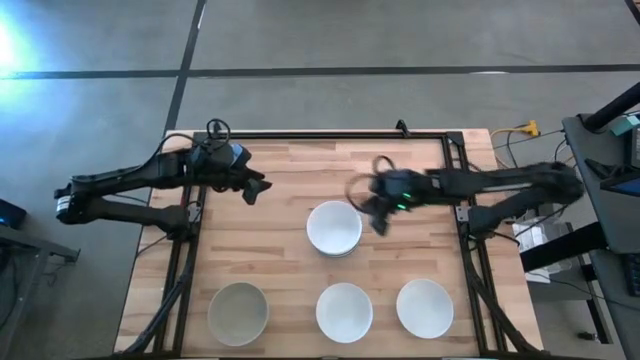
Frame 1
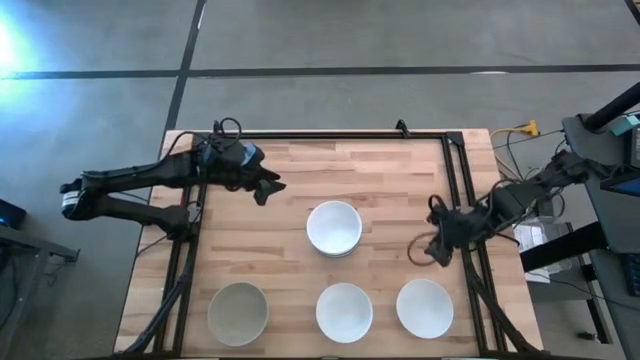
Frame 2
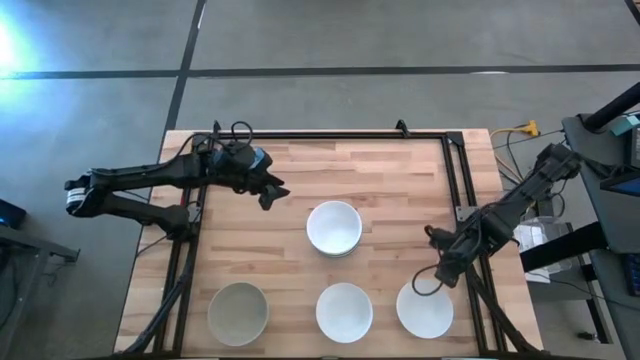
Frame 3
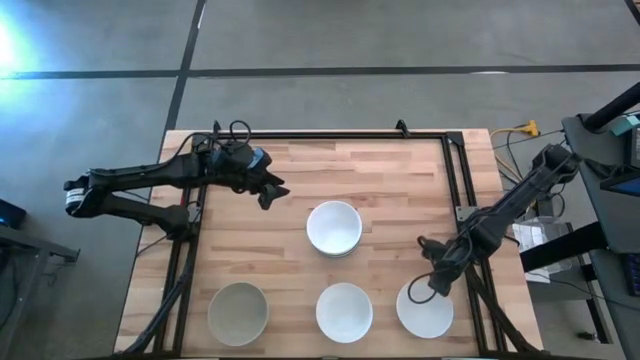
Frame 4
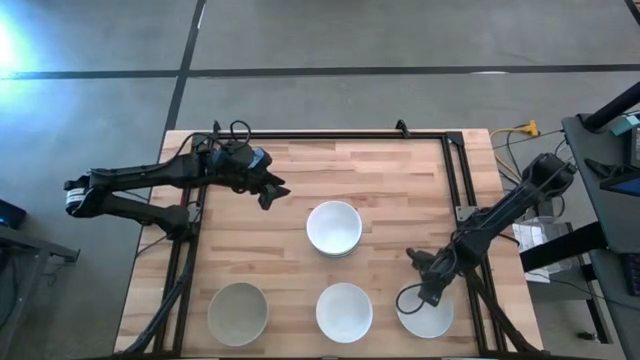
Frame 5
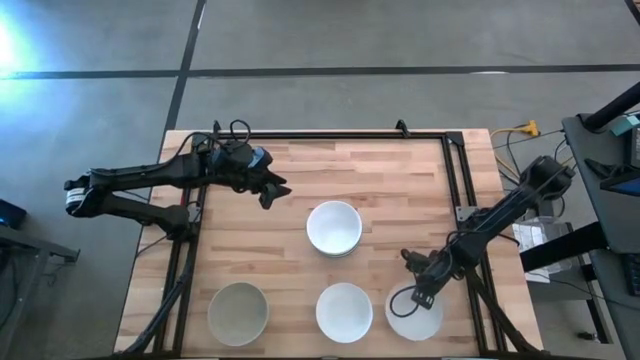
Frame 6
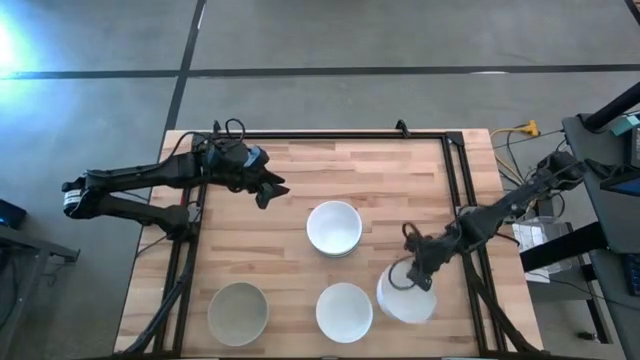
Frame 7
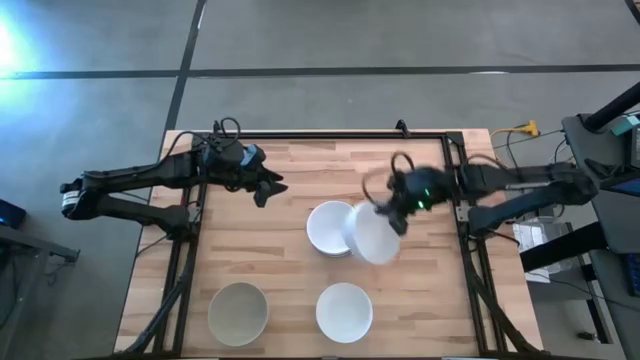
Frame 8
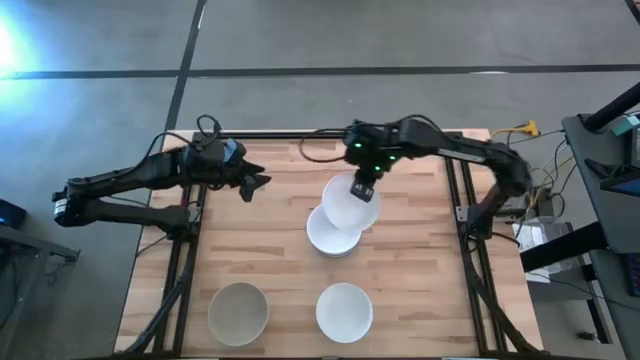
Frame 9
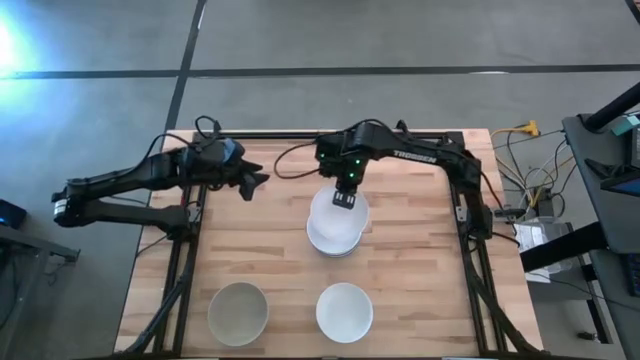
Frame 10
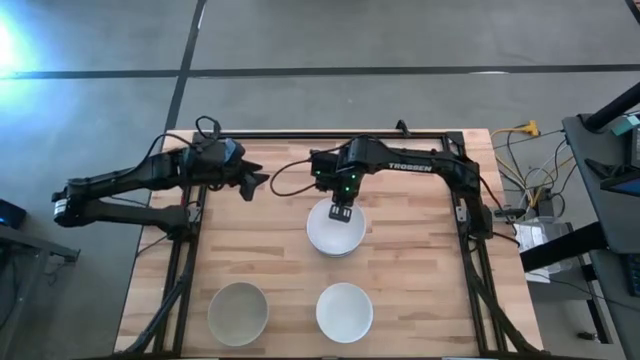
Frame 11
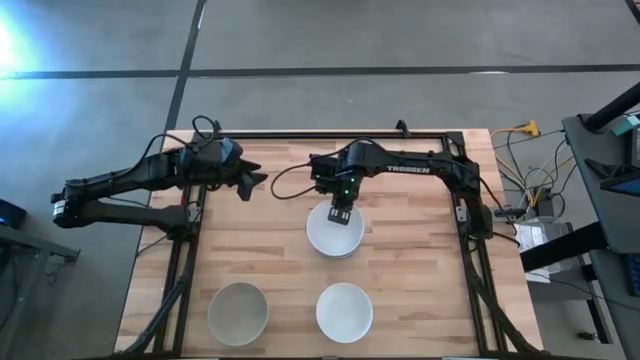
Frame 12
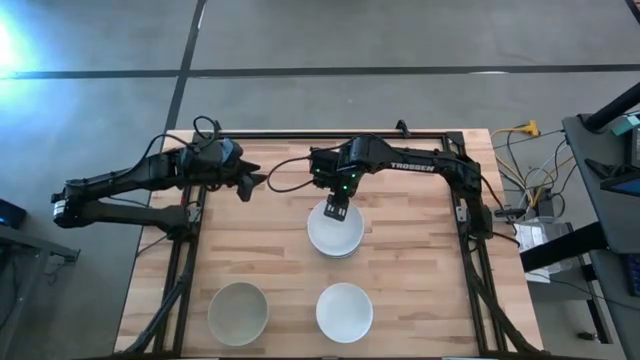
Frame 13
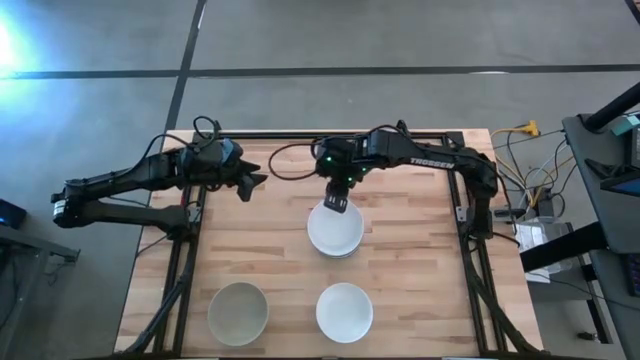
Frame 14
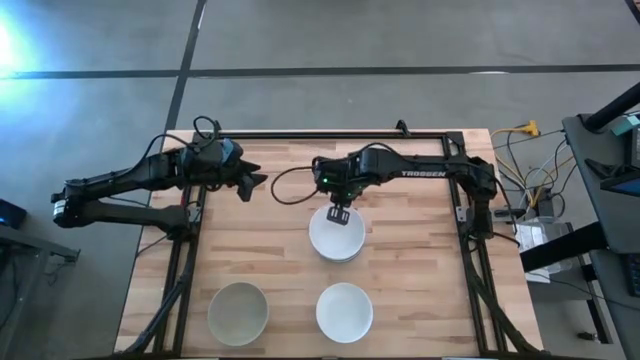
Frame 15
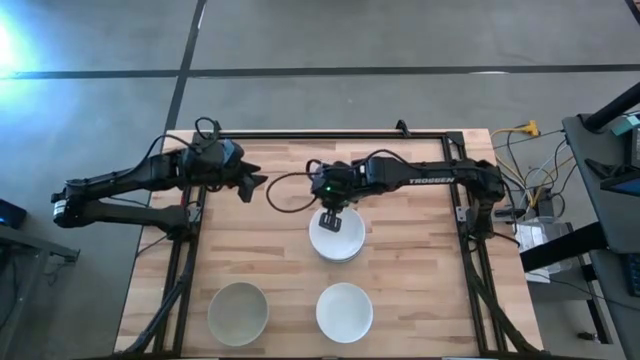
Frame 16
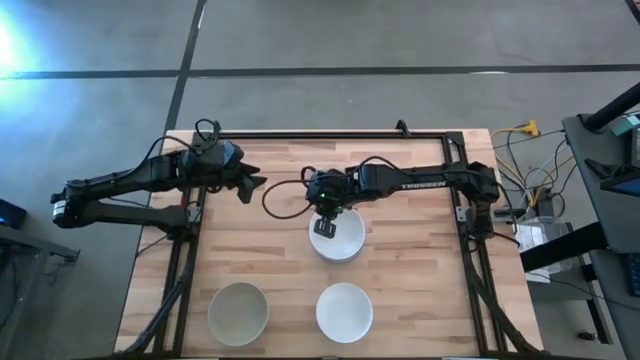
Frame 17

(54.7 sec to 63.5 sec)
Task: Nest bowls inside each other
Stack the white bowl on top of the white bowl

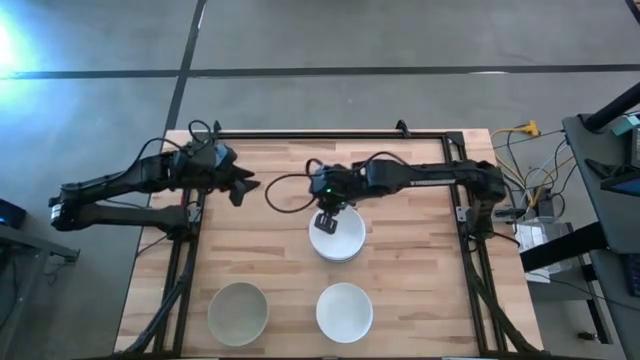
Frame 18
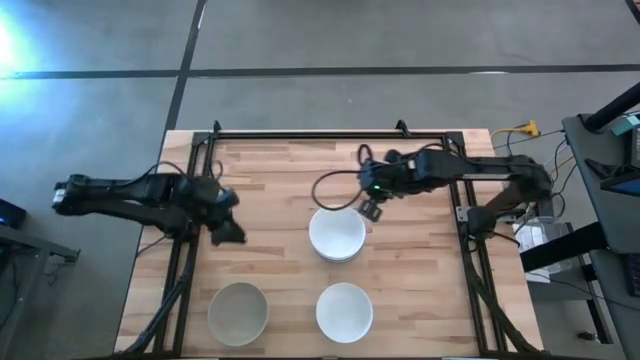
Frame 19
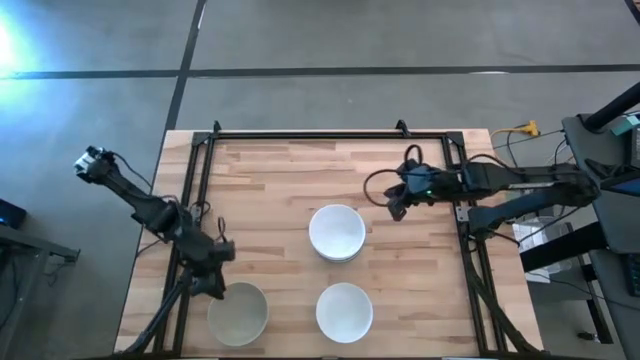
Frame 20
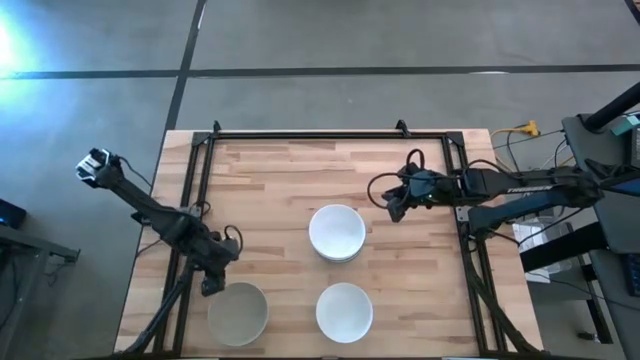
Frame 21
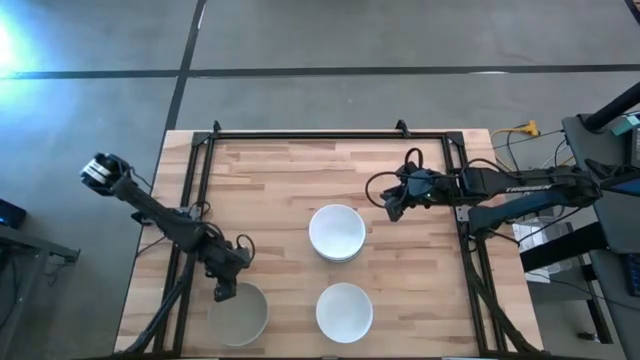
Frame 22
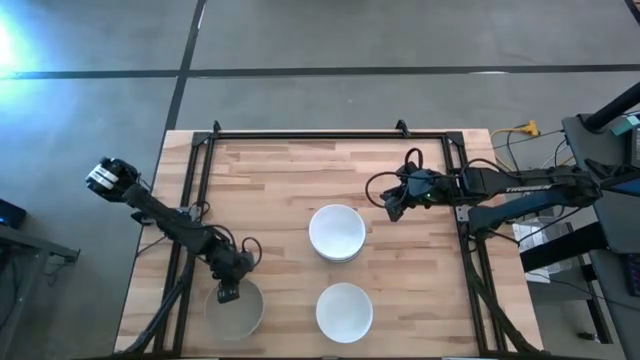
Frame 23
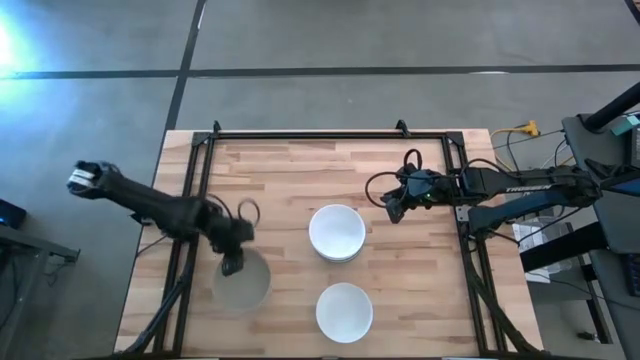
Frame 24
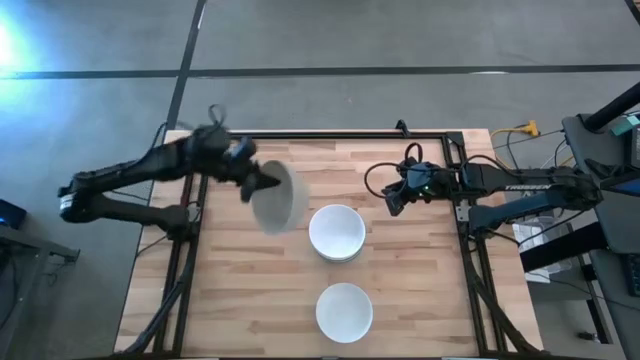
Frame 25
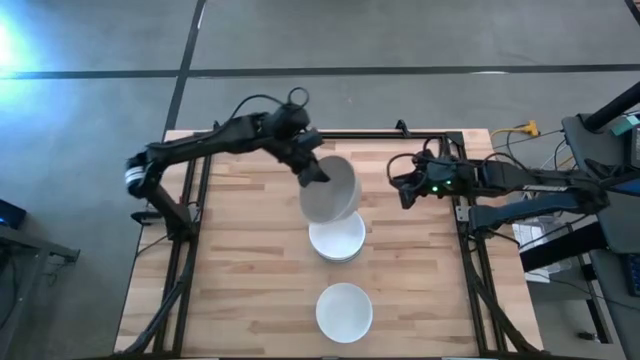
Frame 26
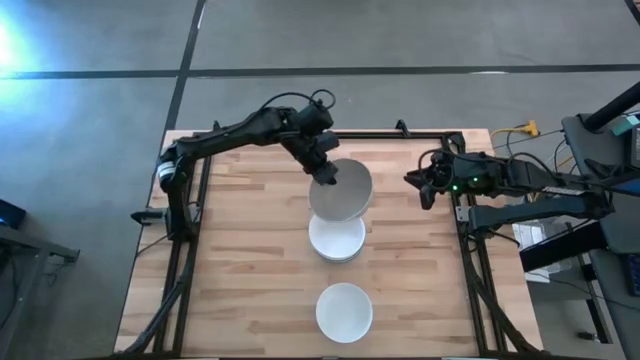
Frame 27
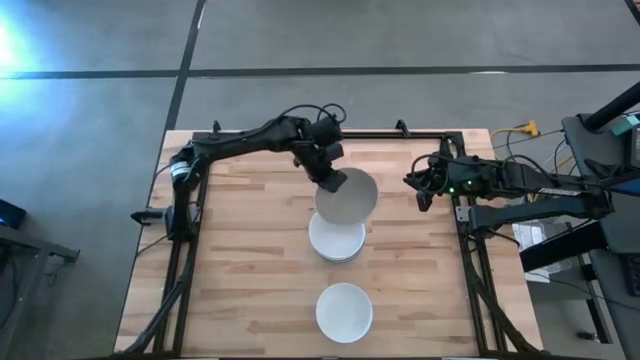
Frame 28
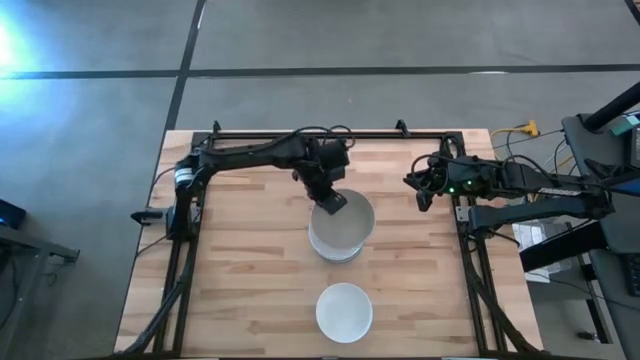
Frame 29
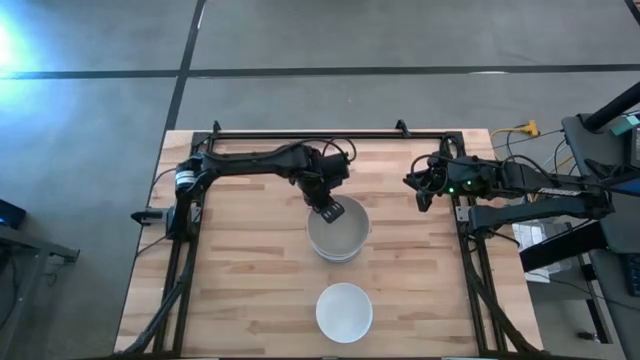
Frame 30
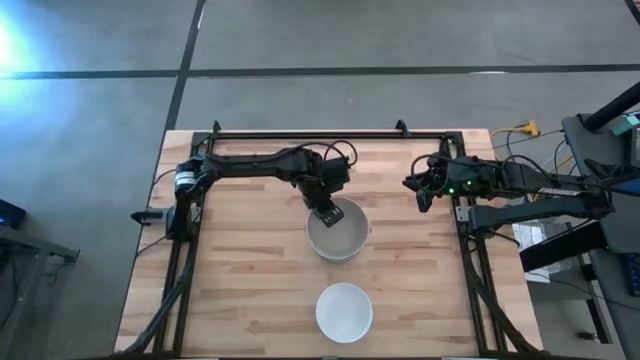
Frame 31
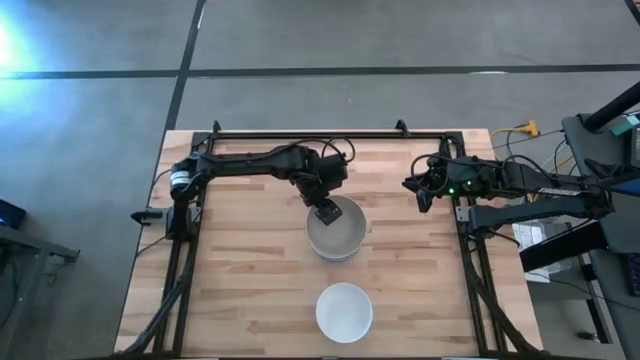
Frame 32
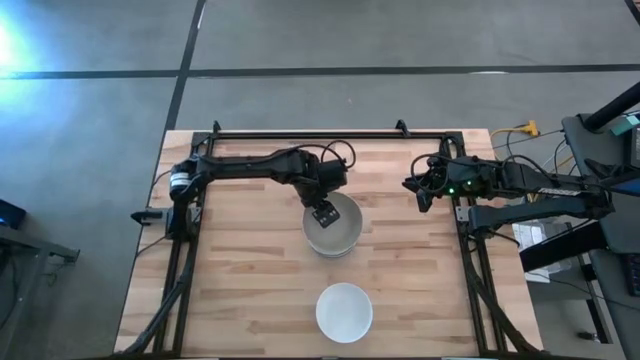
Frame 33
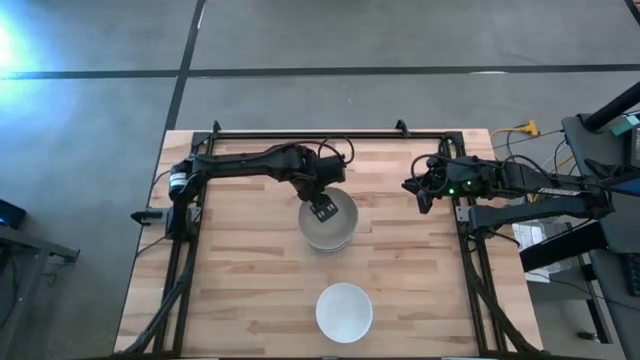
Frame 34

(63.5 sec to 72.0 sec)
Stack the light grey bowl on top of the white bowl

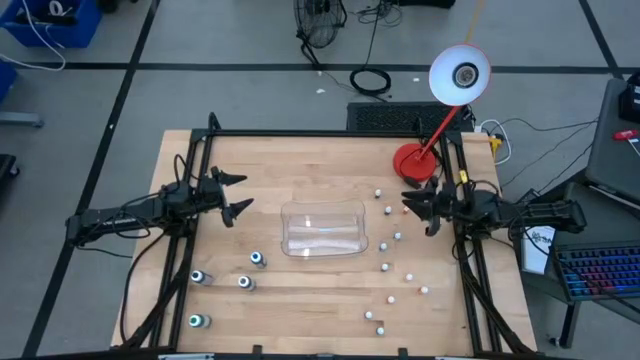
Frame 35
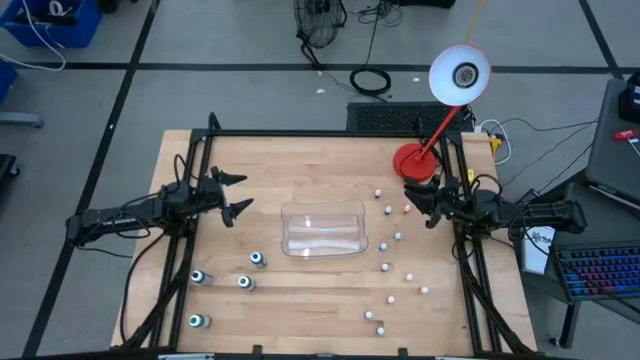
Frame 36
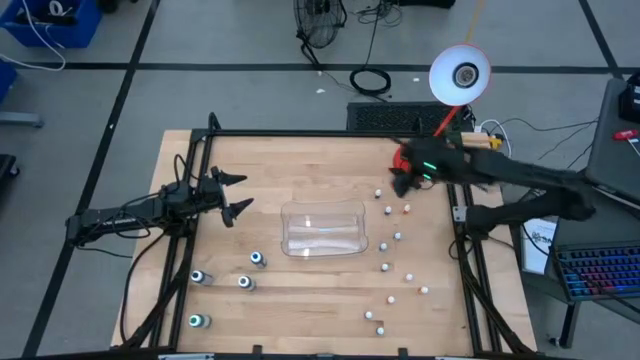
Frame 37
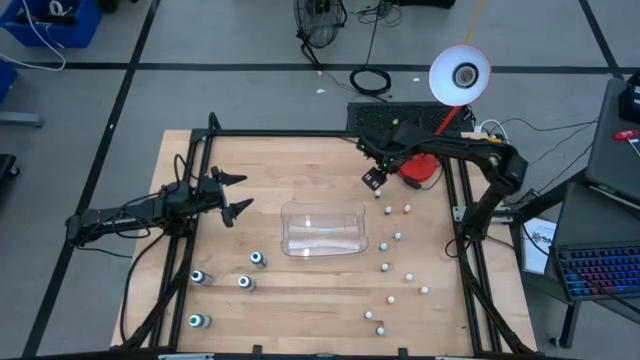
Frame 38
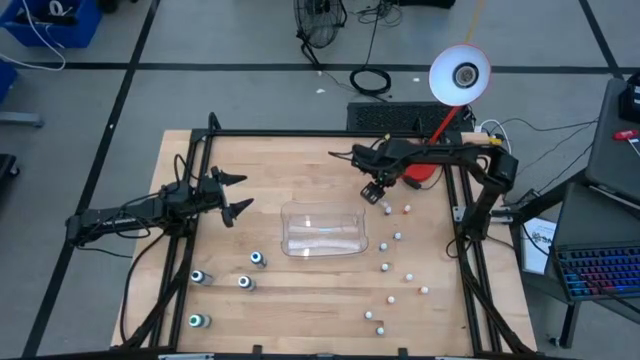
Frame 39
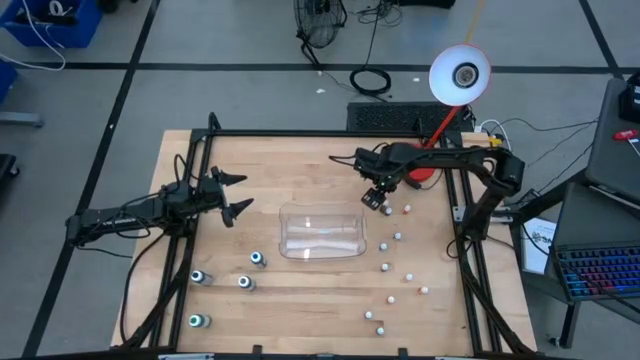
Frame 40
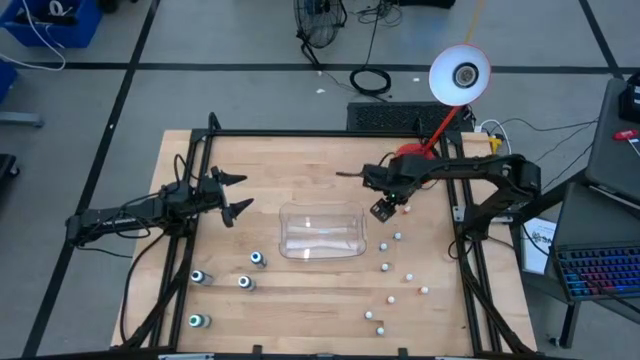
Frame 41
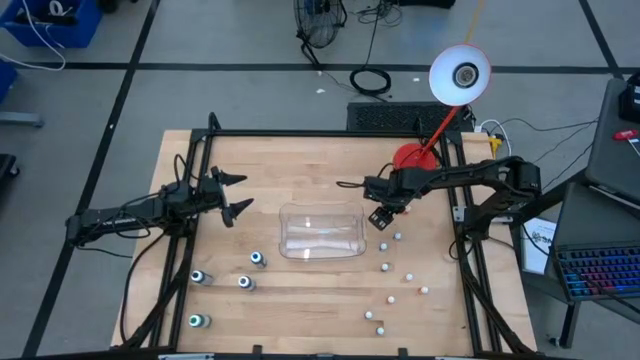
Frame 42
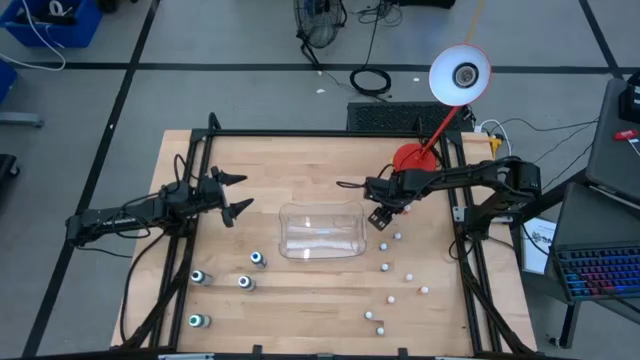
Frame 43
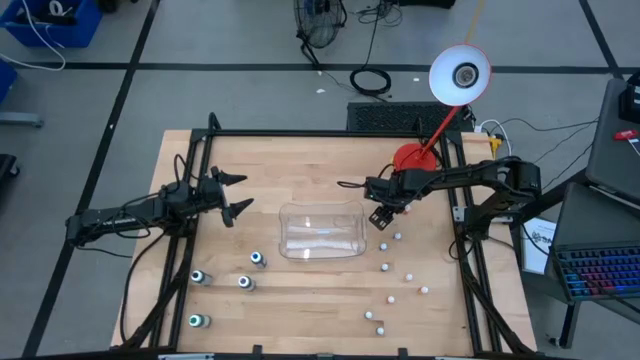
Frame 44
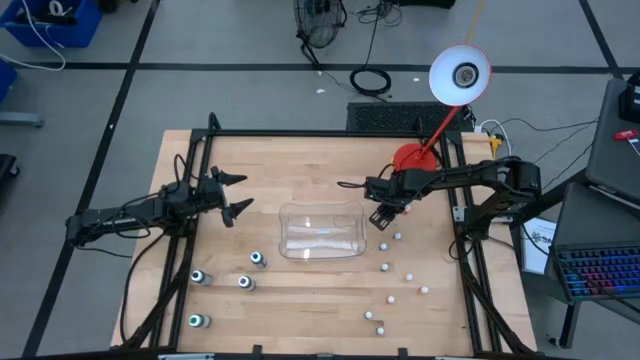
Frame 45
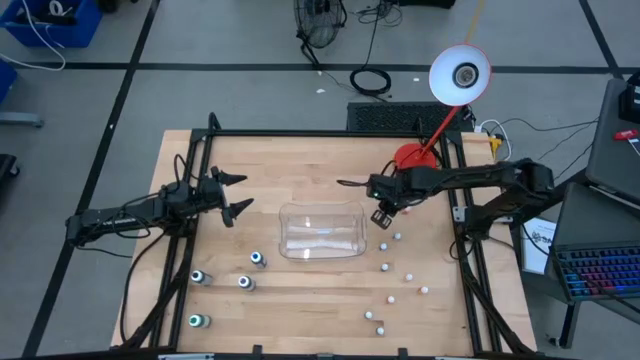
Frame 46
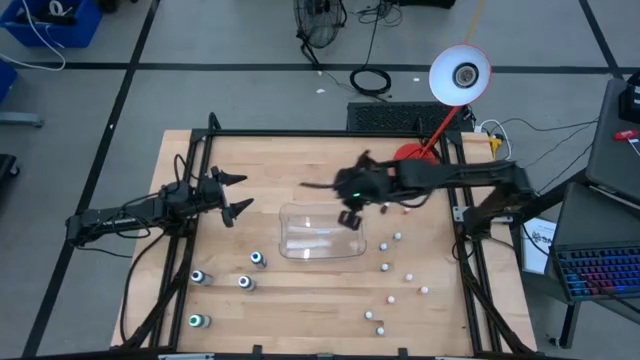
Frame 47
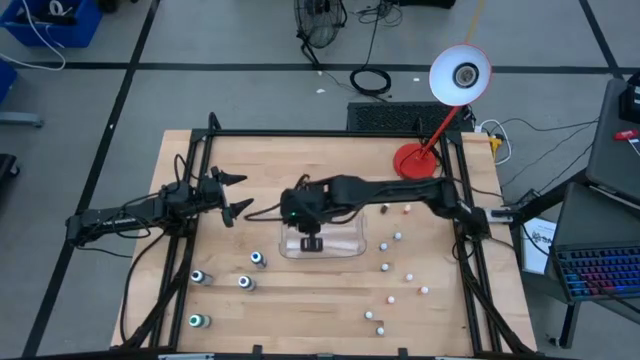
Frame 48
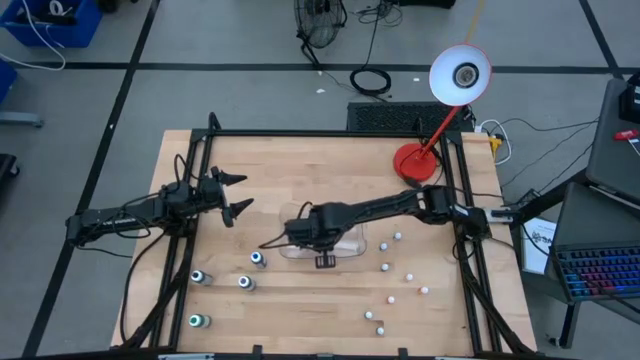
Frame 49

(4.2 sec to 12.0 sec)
Task: Pick & Place food coloring
Put the small pink food coloring bottle into the transparent bin
